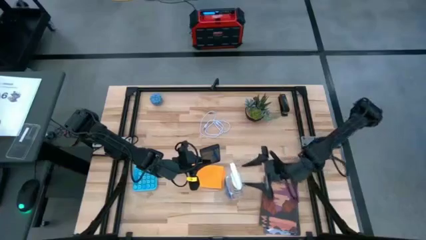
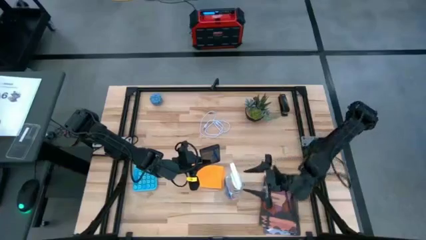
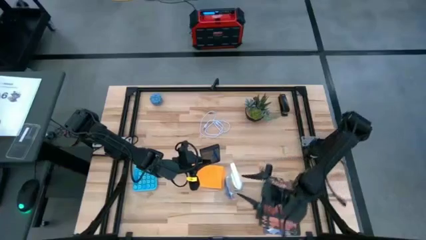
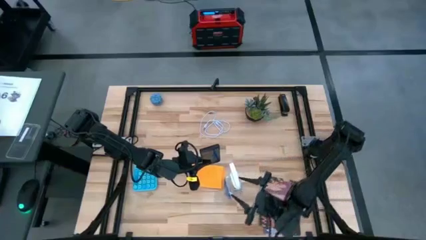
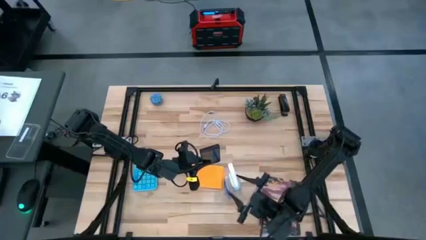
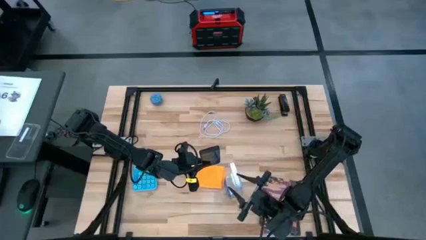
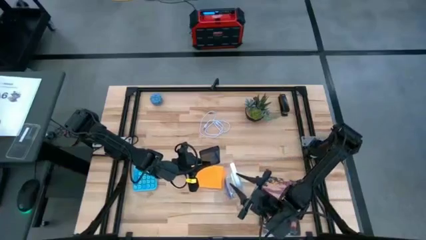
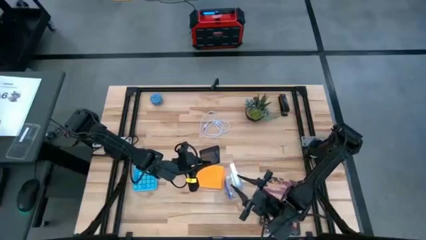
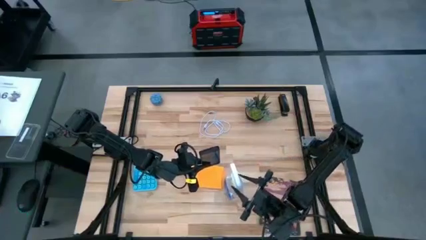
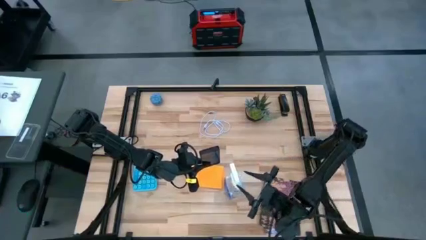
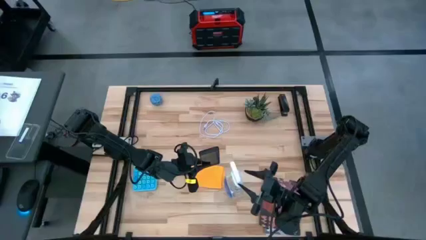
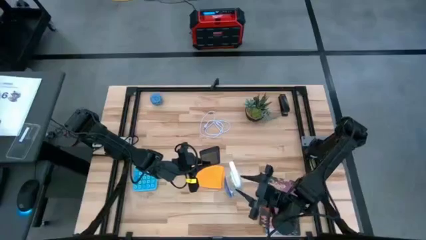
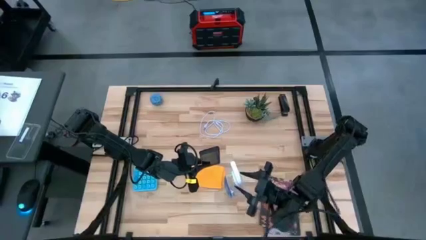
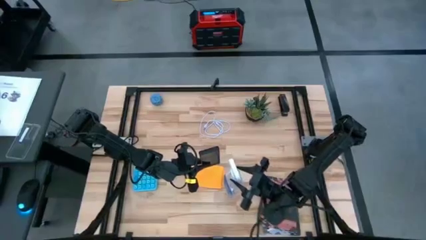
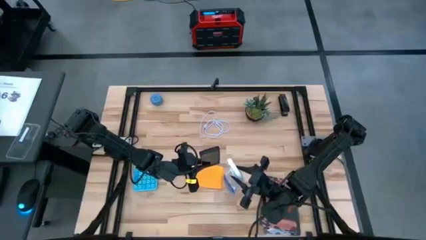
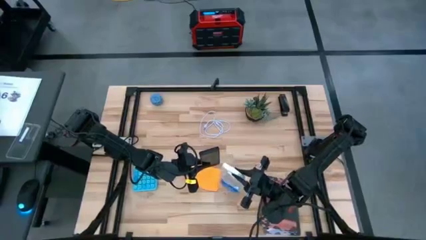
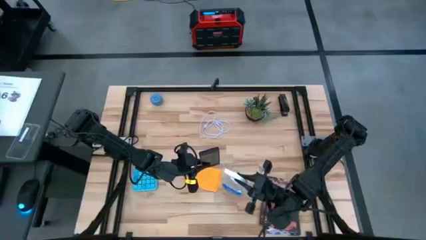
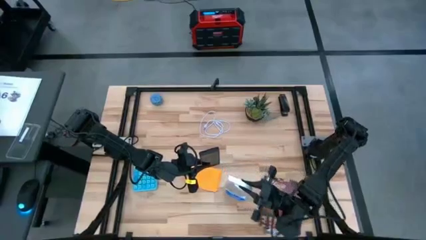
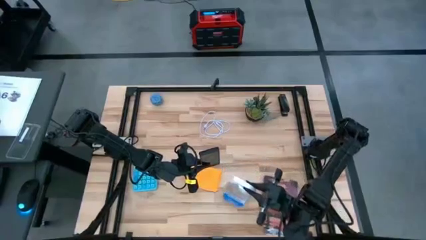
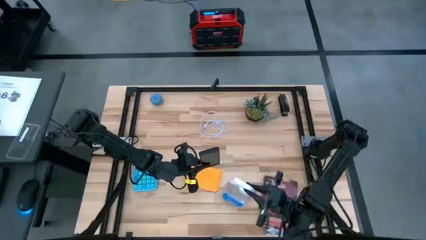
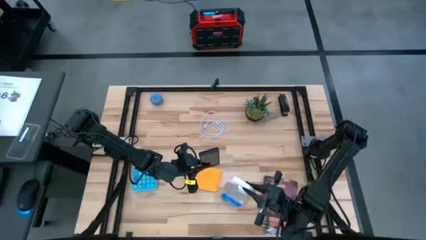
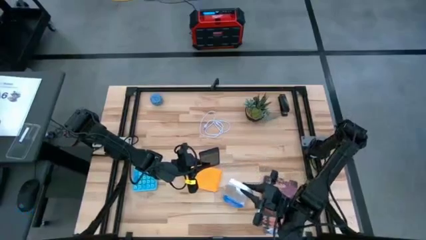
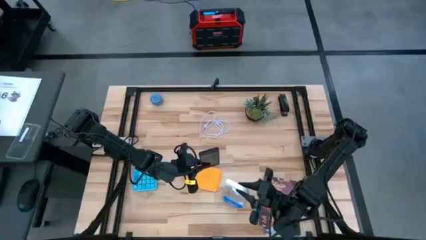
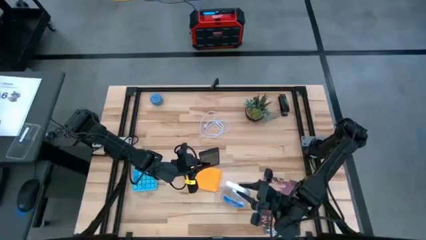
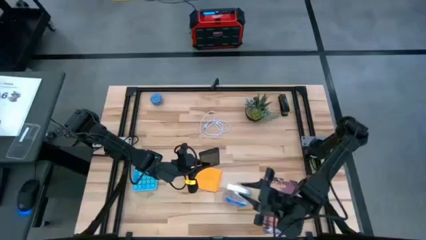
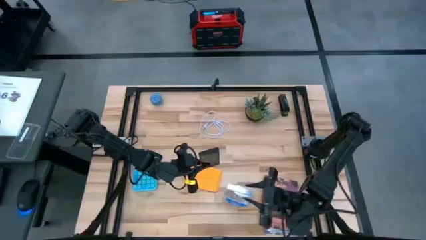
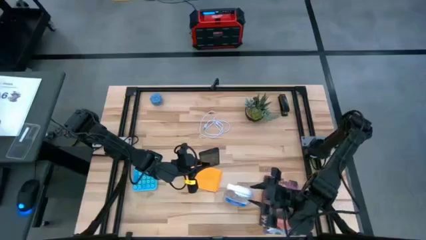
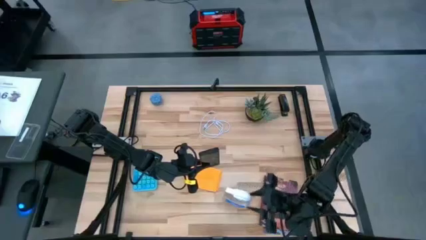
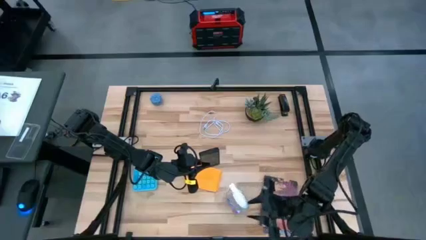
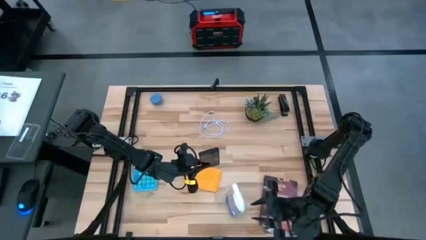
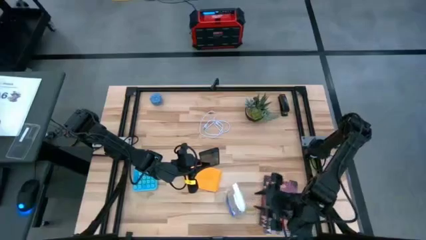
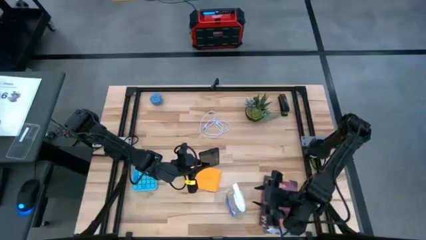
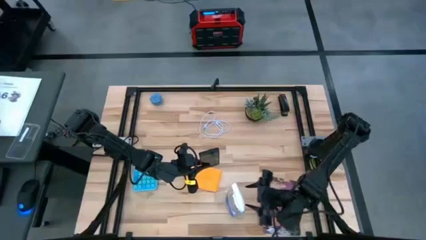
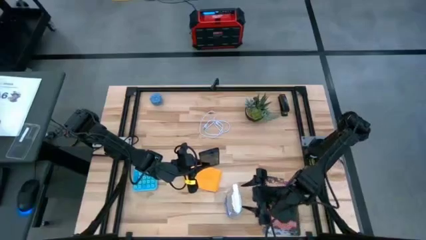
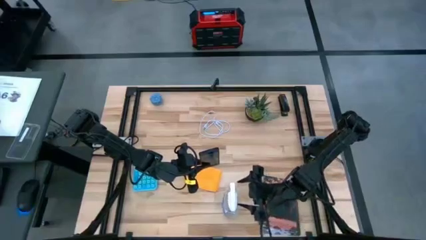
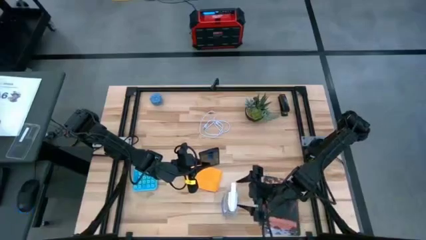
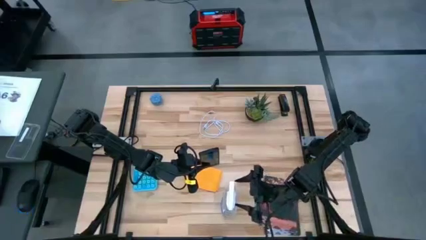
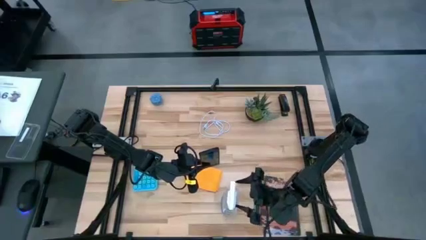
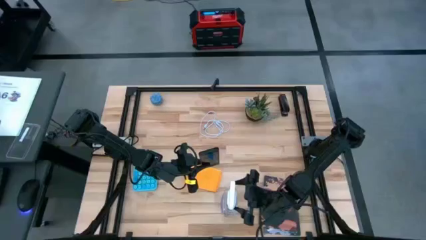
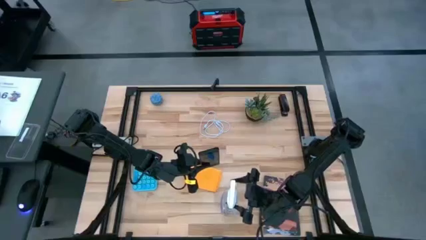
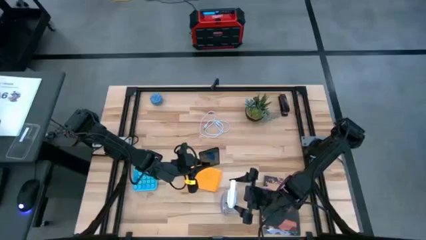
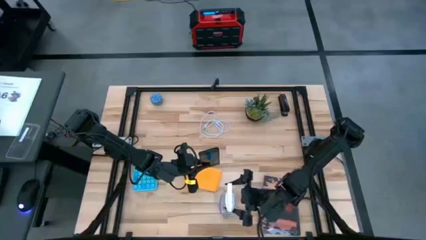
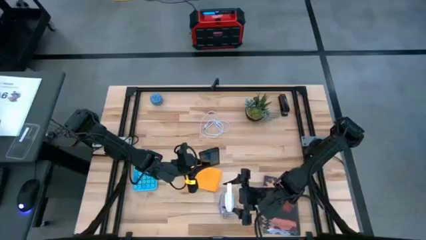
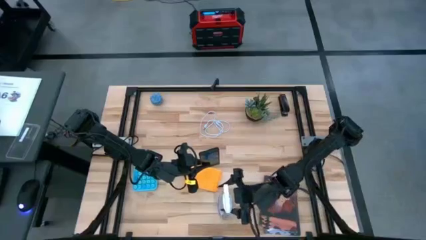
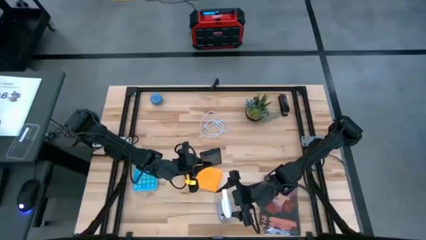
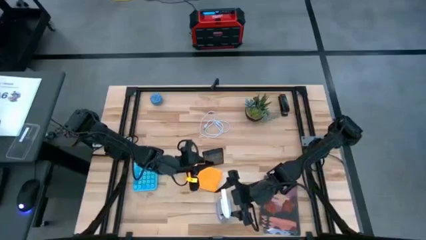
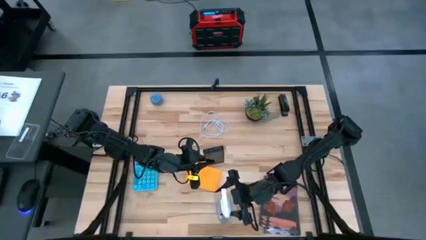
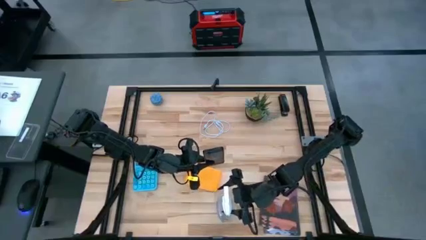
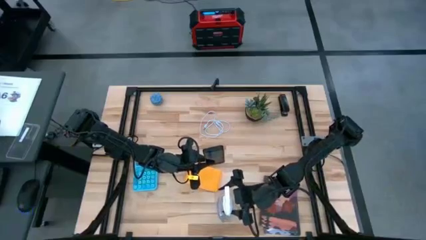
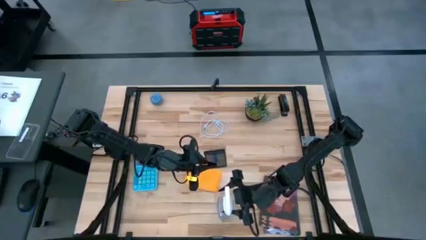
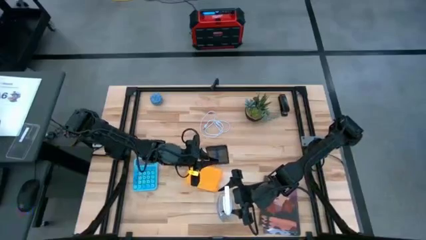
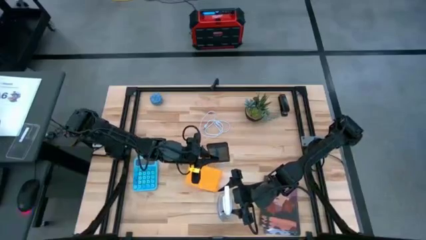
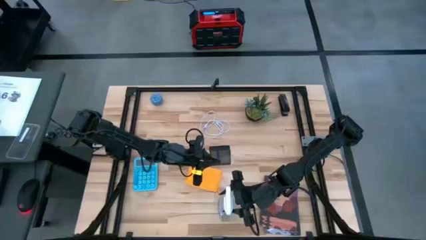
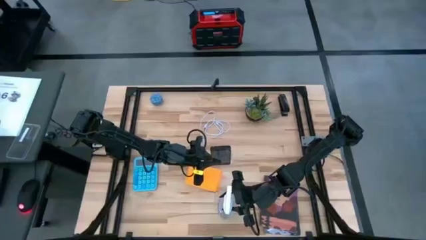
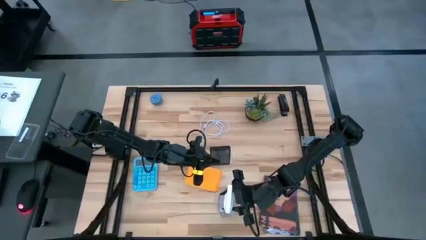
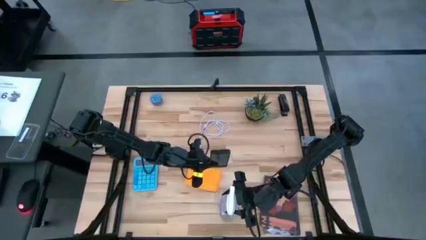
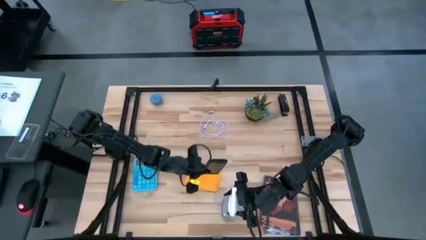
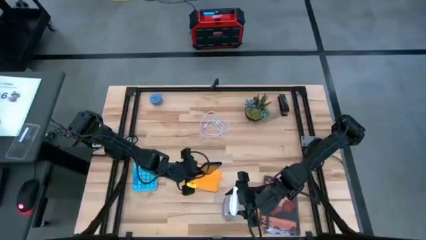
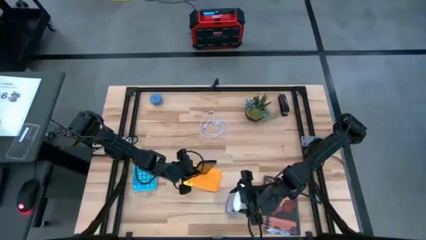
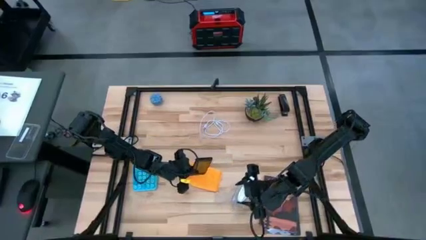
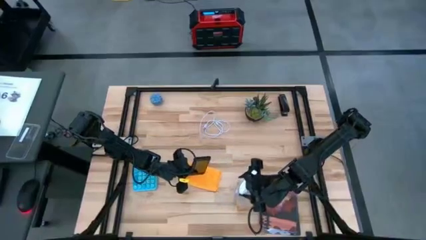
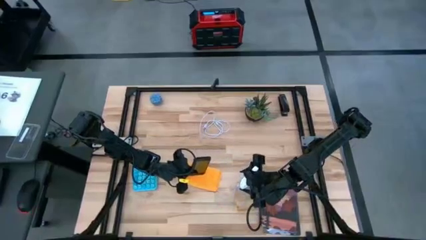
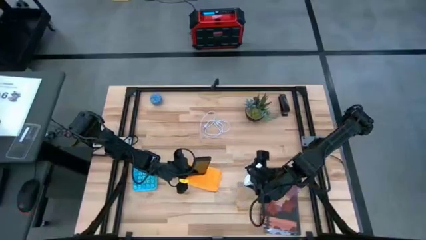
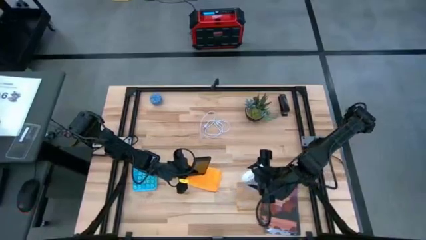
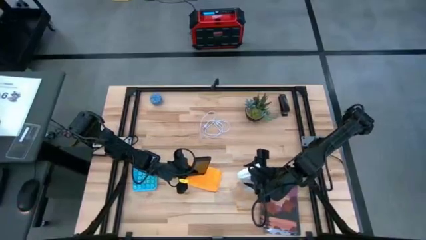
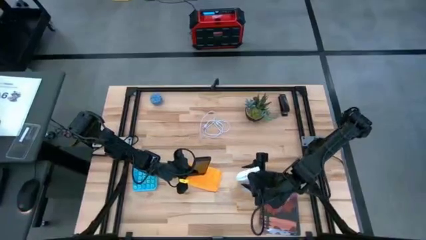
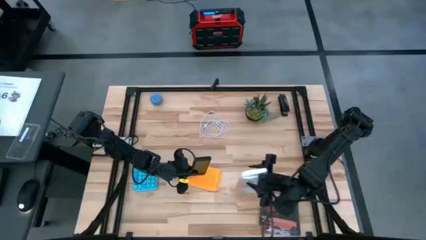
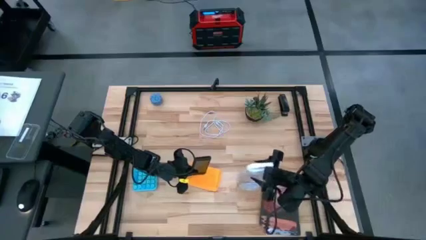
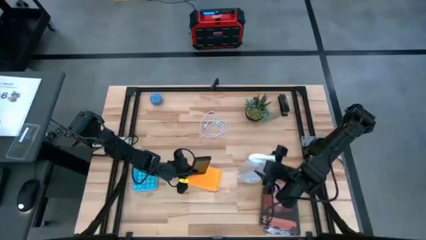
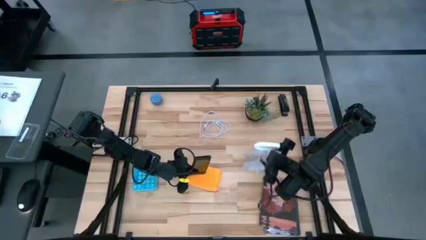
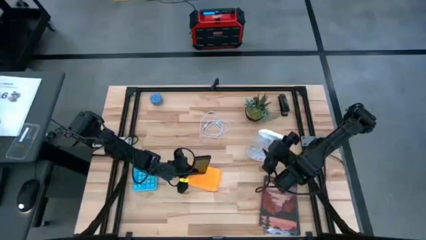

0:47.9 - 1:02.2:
Task: Apply microfiber cloth
Spray the black cellphone

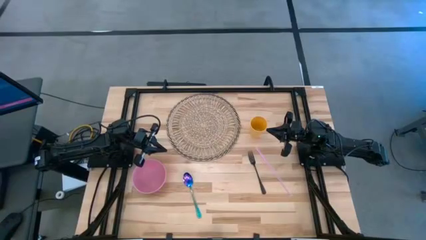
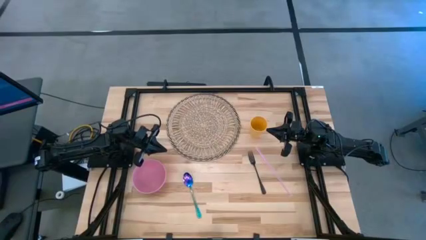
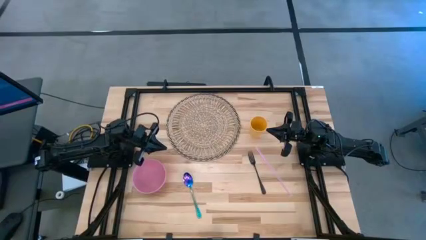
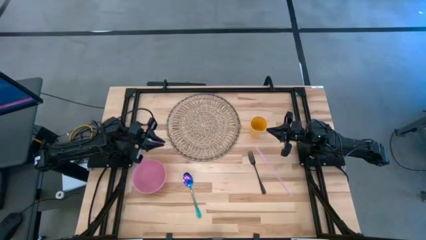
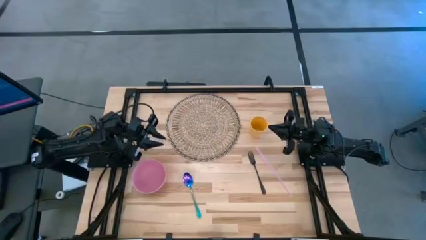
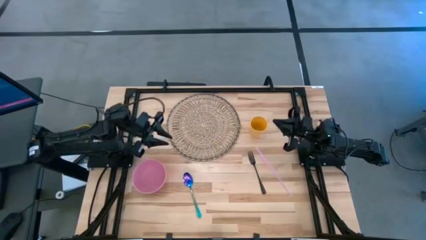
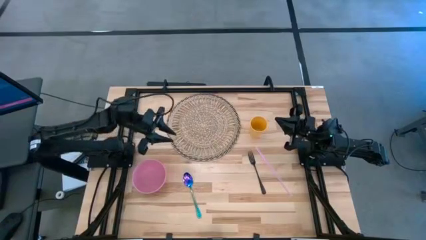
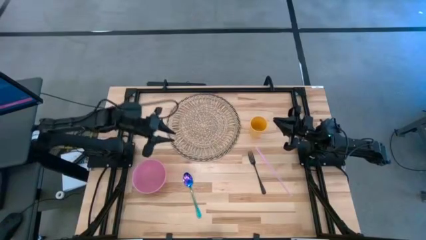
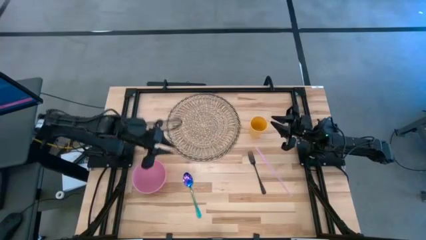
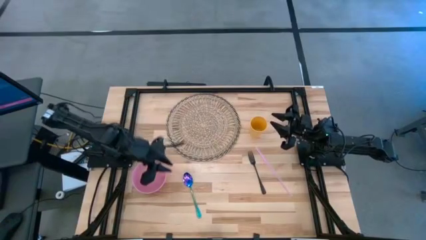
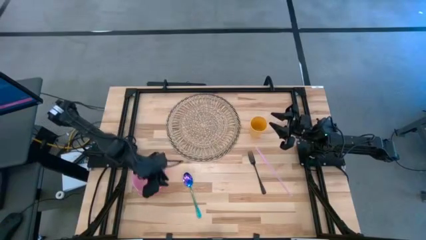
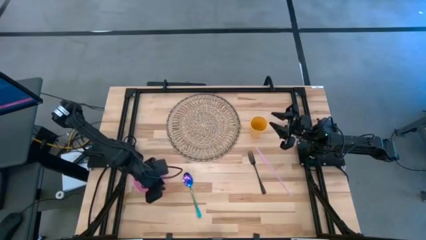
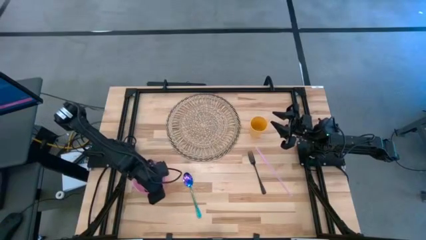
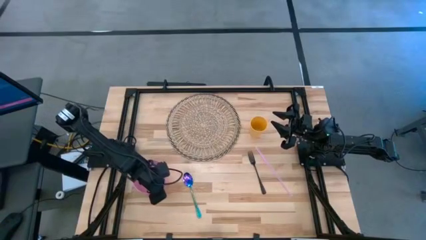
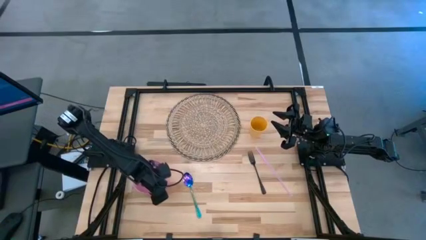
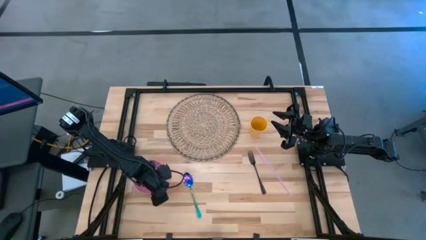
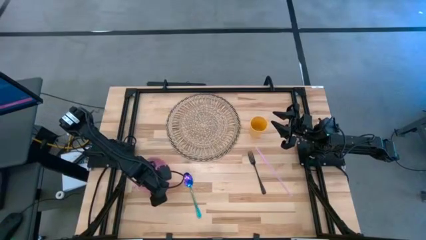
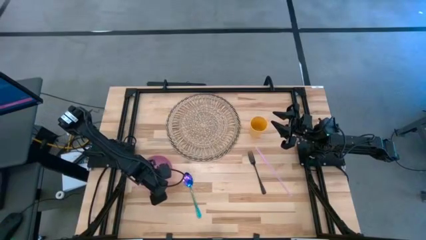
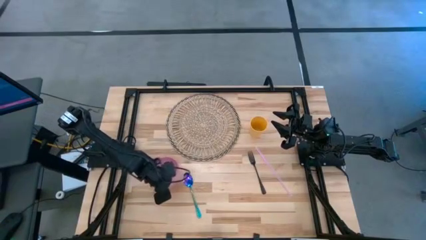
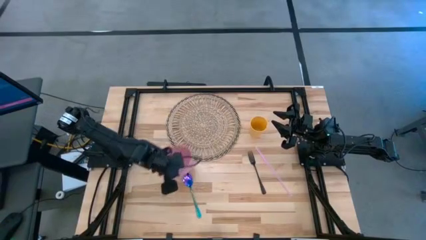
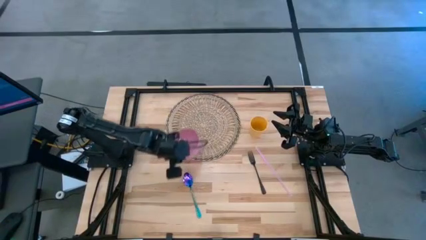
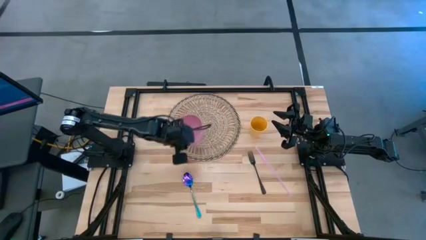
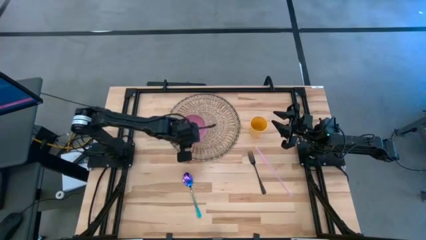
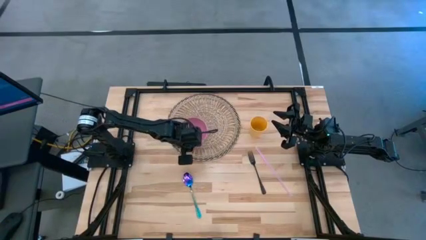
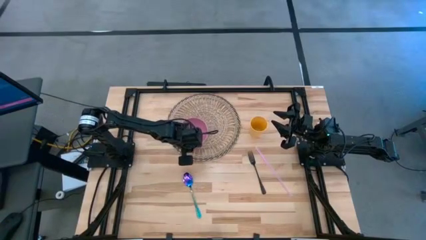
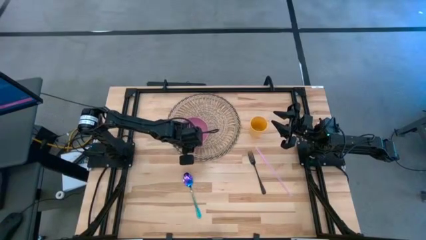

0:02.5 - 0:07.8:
Task: Pick & Place Utensil
Put the pink bowl on the placemat
